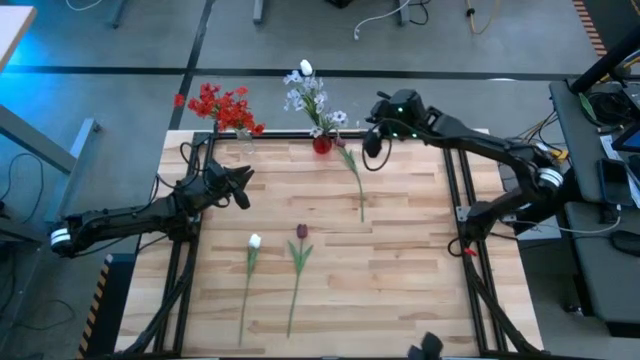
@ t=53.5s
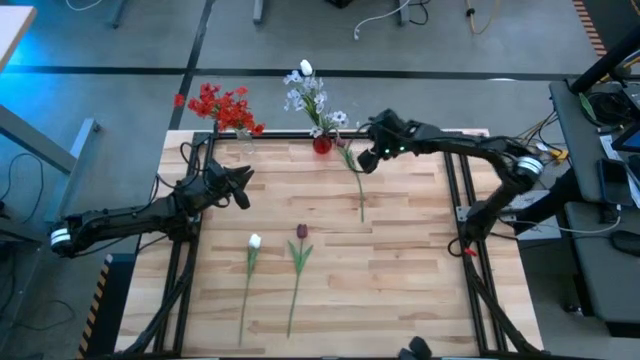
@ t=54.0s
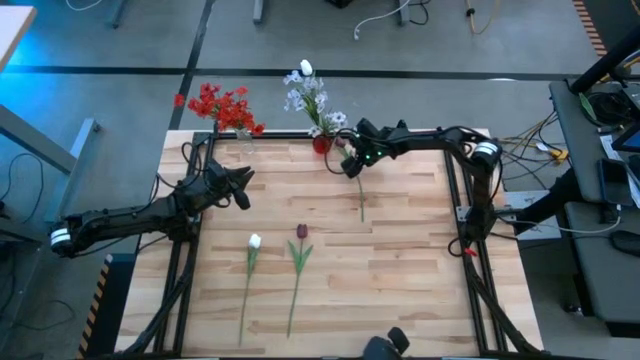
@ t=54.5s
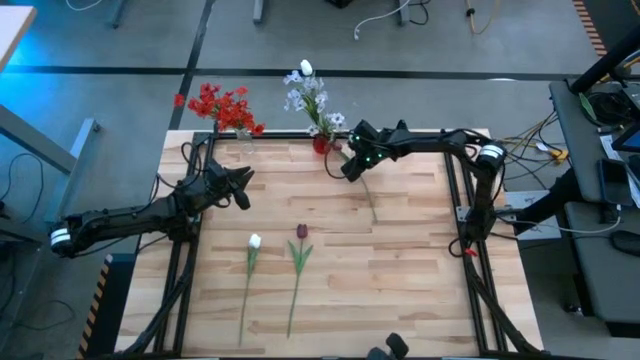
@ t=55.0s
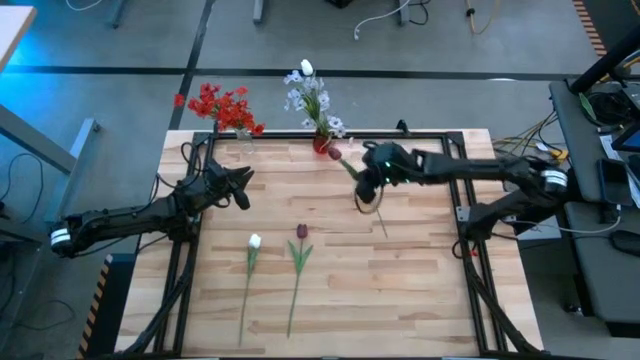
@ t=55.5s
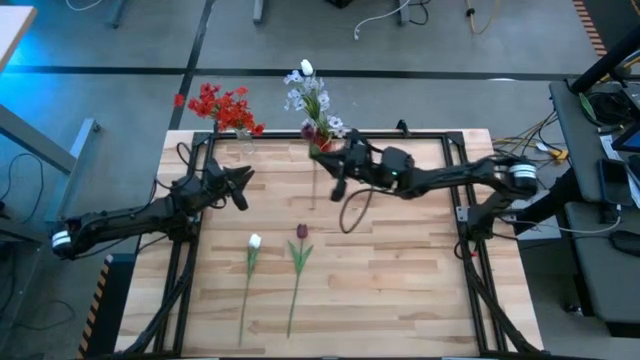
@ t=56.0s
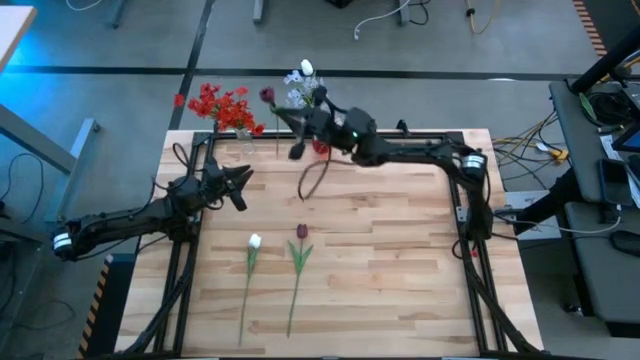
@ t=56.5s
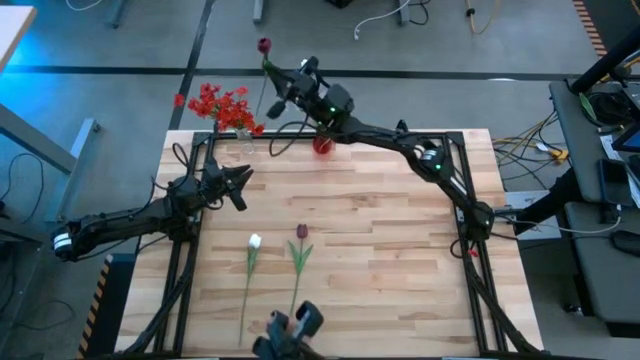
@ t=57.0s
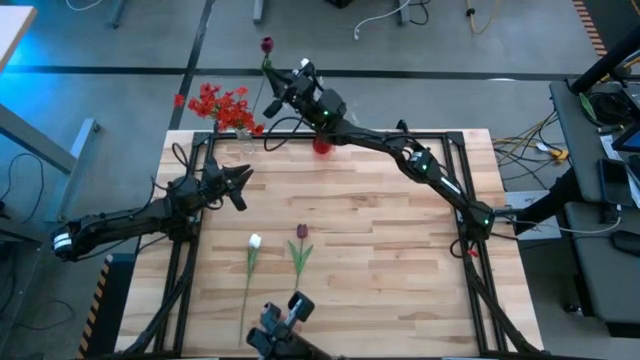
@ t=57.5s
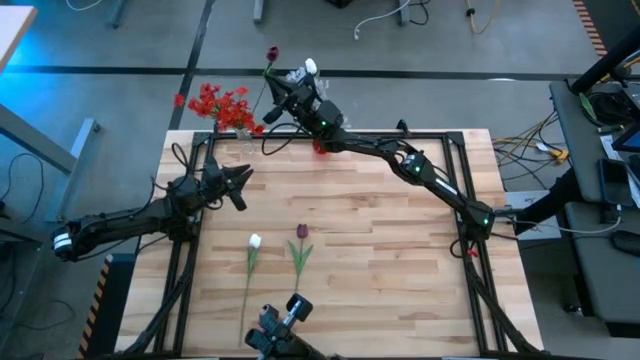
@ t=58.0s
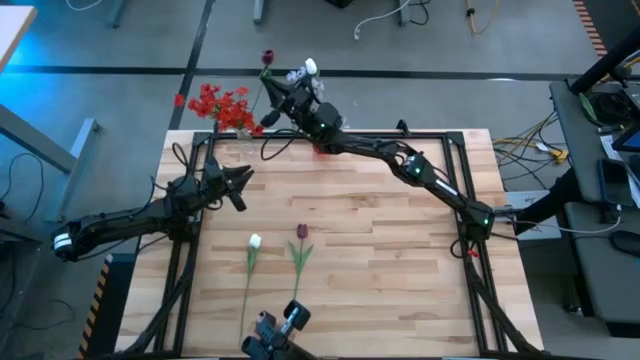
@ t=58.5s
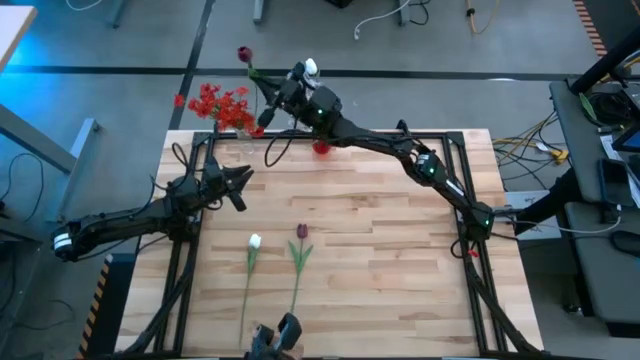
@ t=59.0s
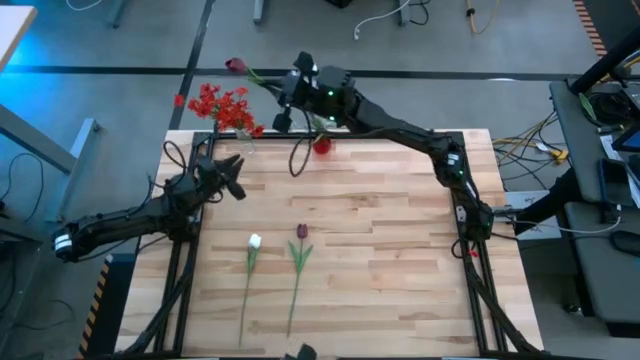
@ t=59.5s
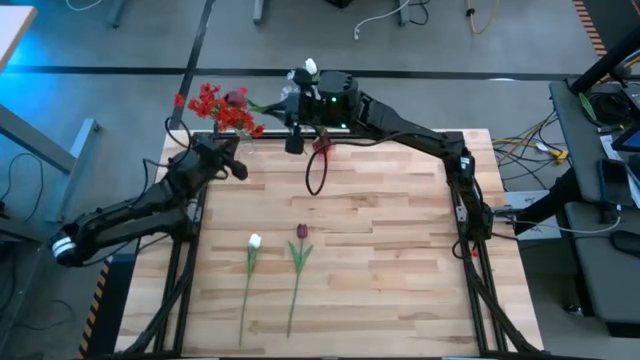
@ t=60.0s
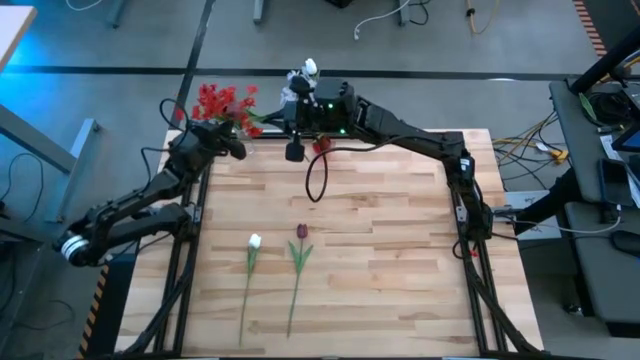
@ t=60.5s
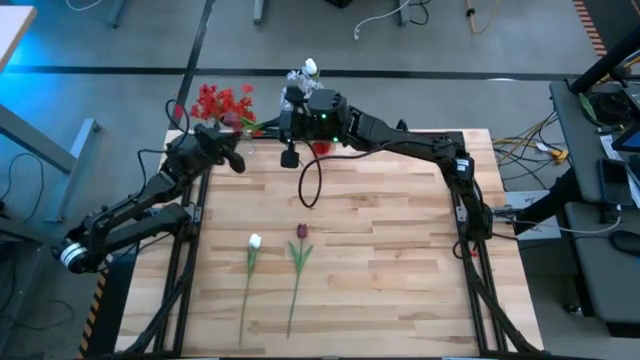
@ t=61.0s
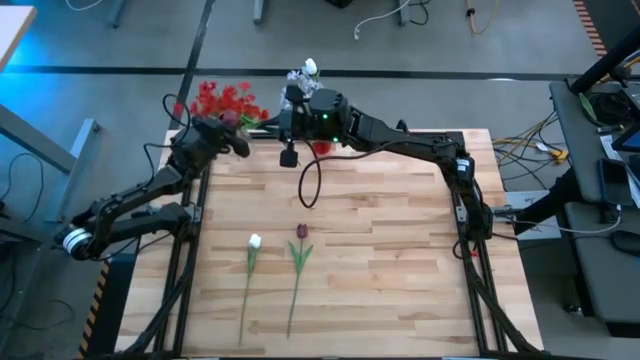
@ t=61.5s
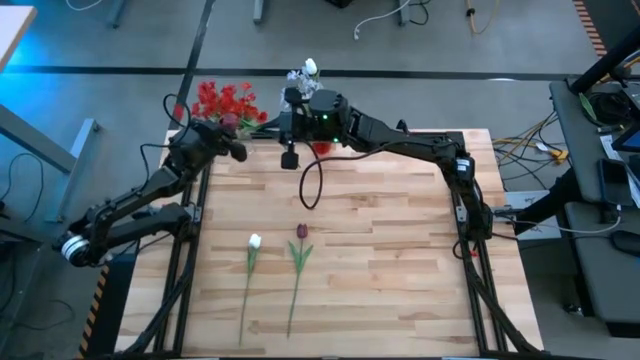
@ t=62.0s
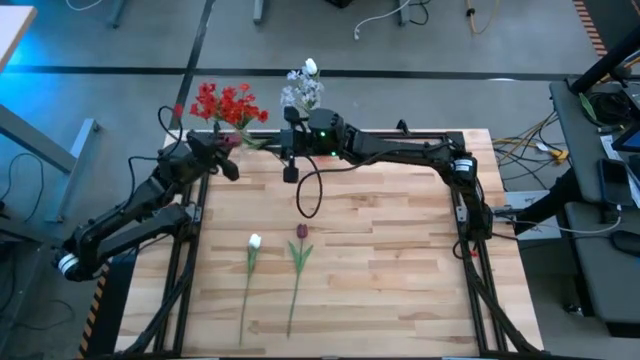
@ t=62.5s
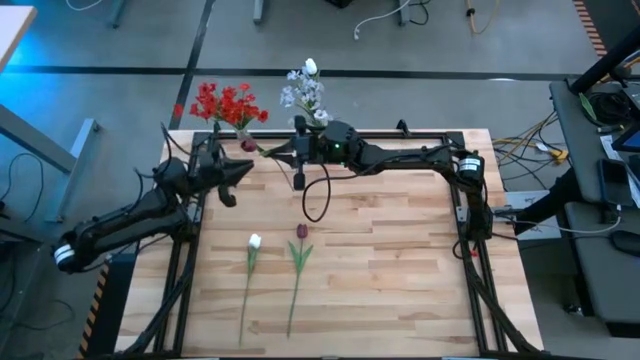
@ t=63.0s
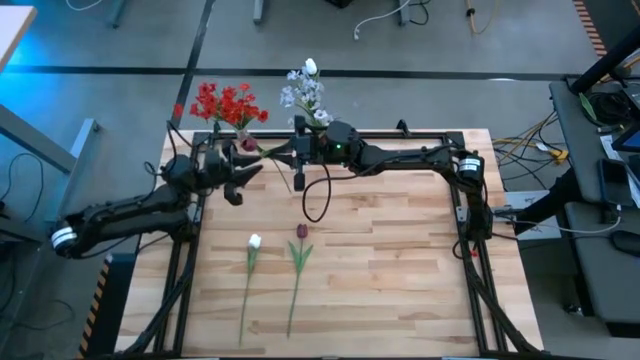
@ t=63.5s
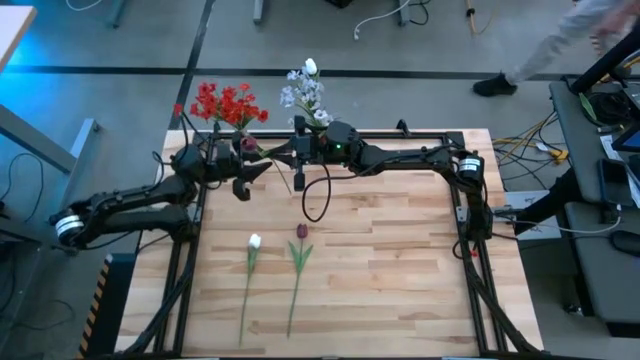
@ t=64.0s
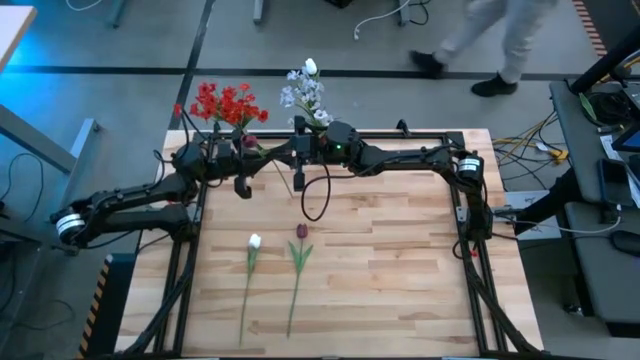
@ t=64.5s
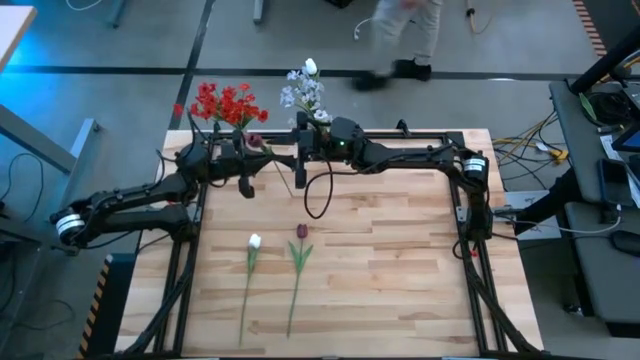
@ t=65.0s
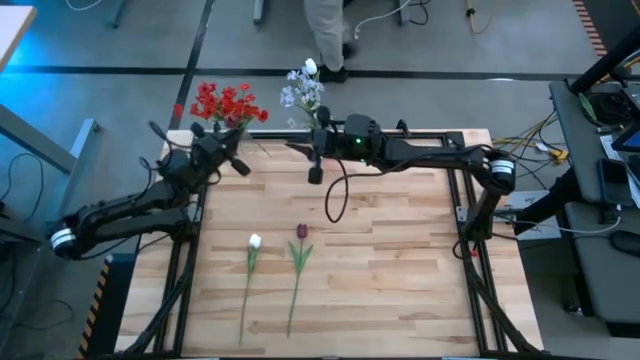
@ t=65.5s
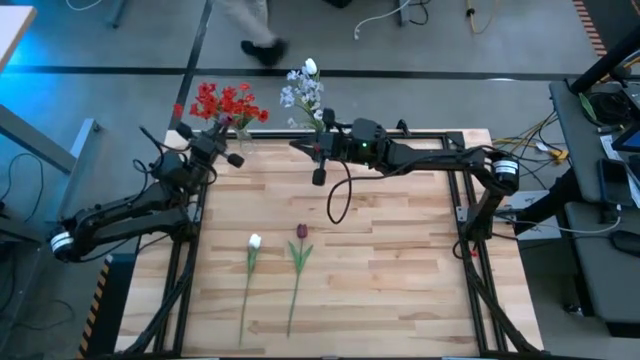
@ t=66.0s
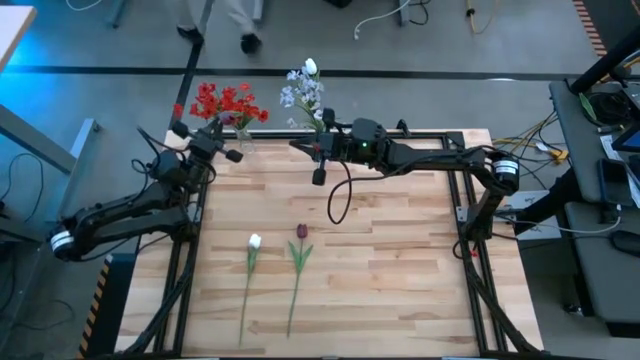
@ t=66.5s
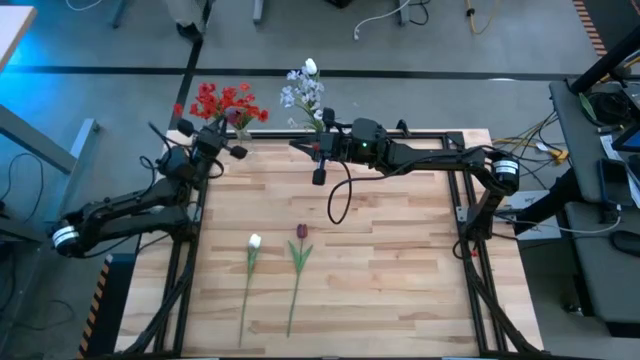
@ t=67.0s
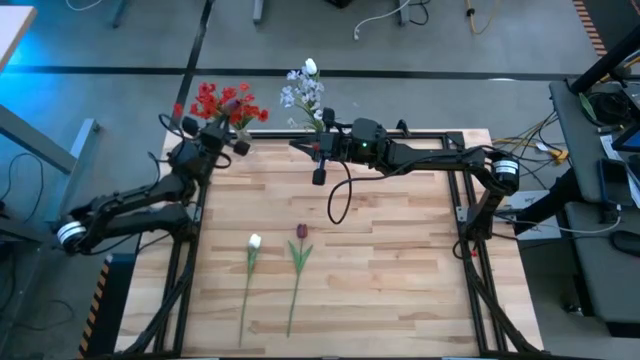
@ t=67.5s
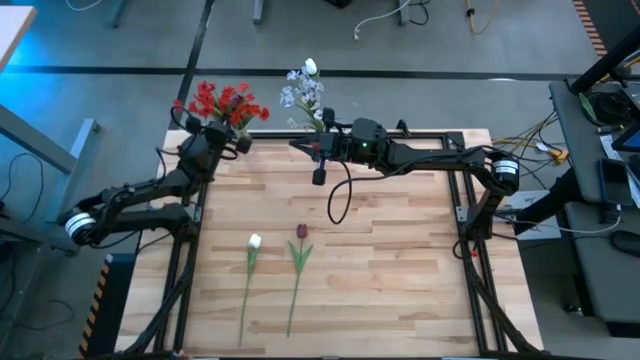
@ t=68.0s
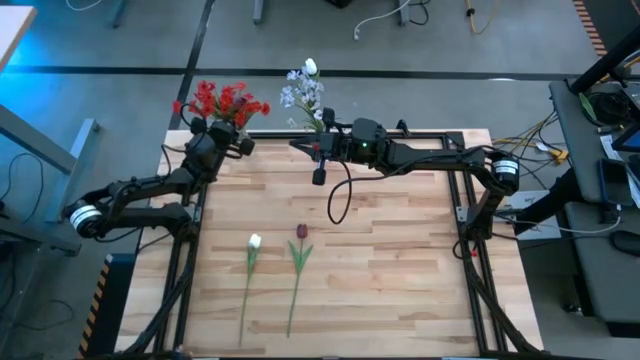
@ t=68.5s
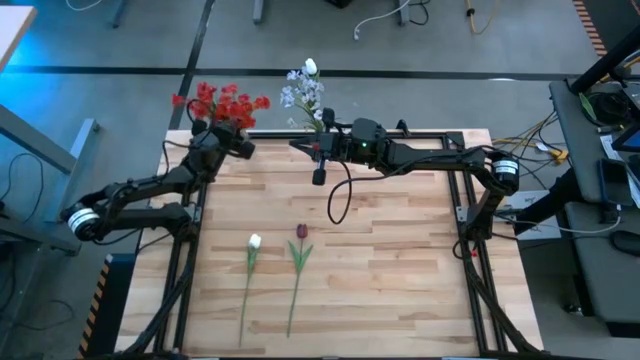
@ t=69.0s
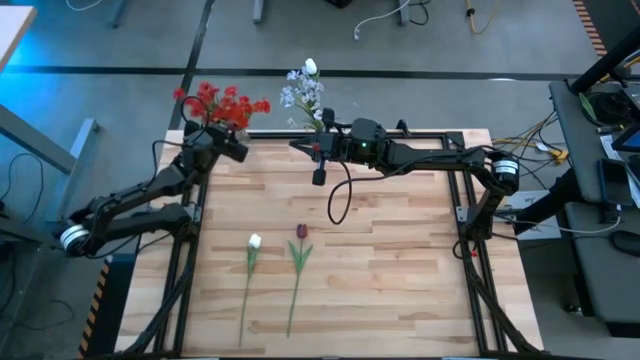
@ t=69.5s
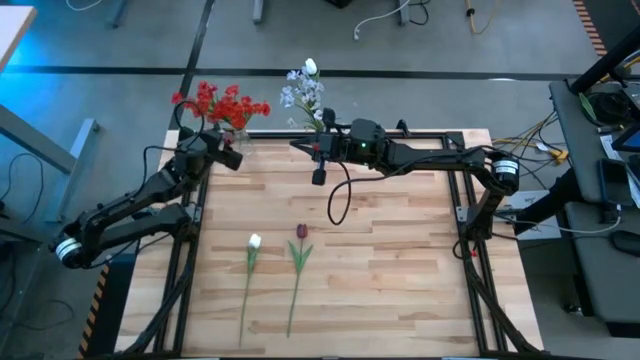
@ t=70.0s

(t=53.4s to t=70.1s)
Task: Sort flowers into vase by color
Put the top red flower into the transparent vase

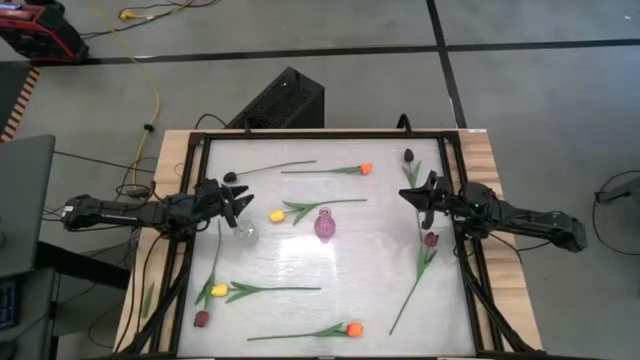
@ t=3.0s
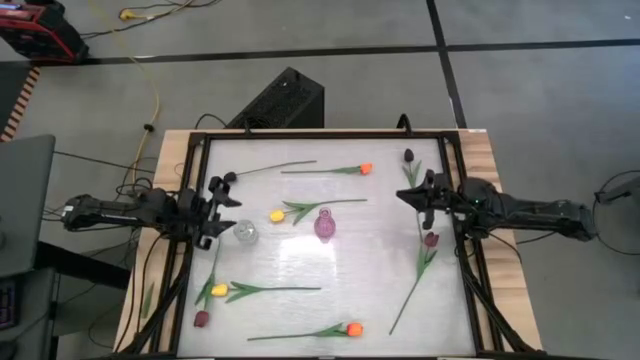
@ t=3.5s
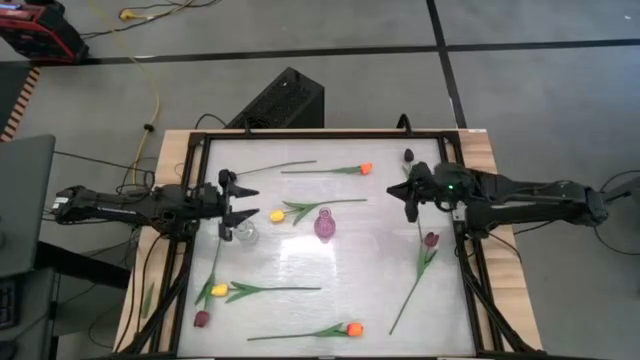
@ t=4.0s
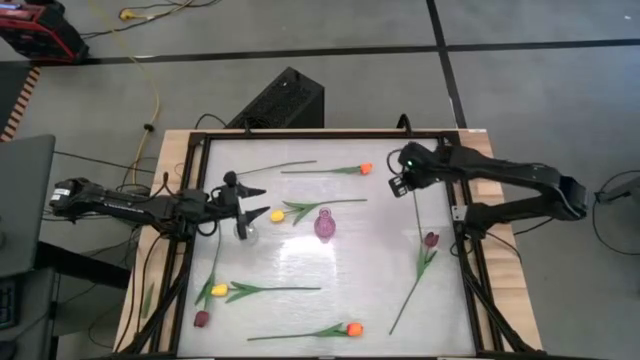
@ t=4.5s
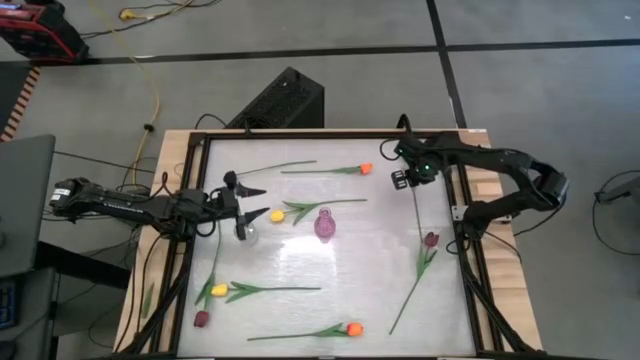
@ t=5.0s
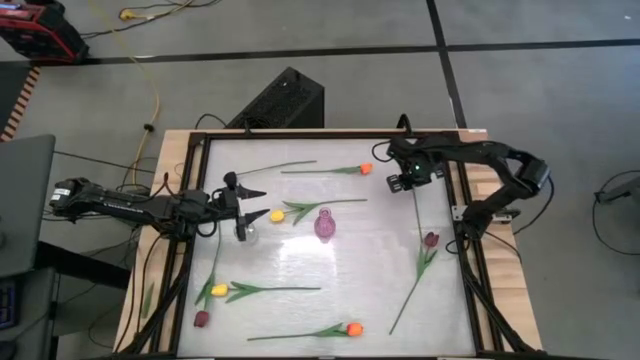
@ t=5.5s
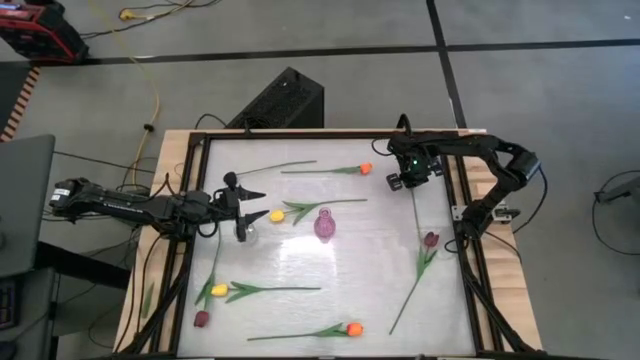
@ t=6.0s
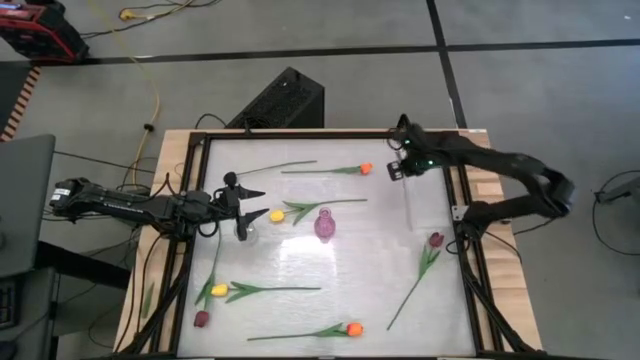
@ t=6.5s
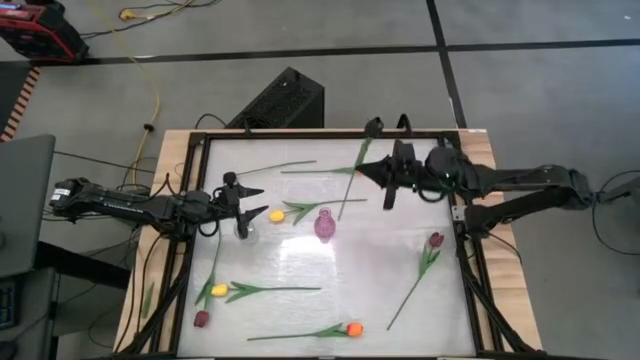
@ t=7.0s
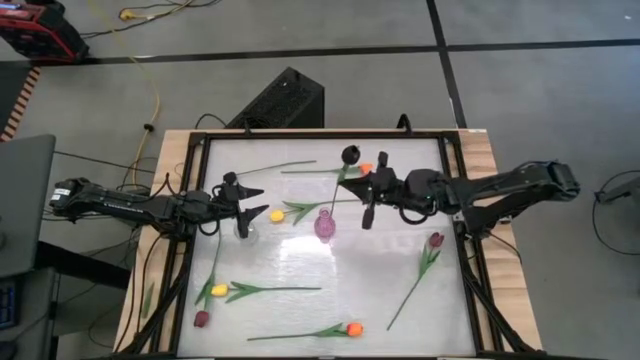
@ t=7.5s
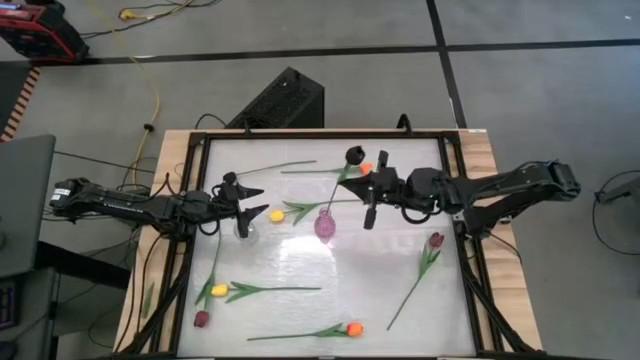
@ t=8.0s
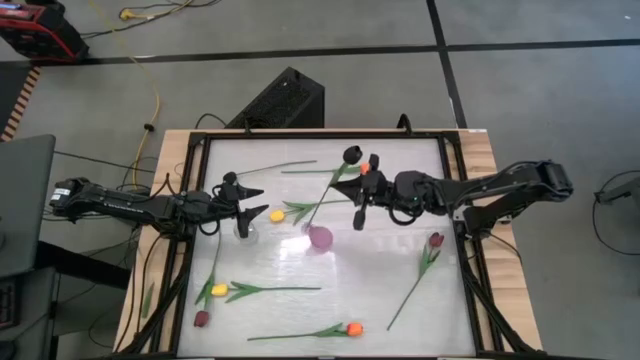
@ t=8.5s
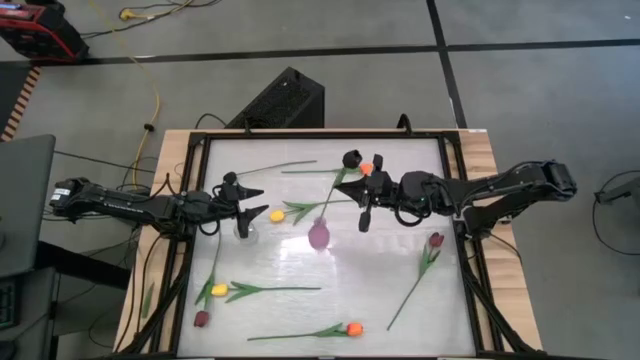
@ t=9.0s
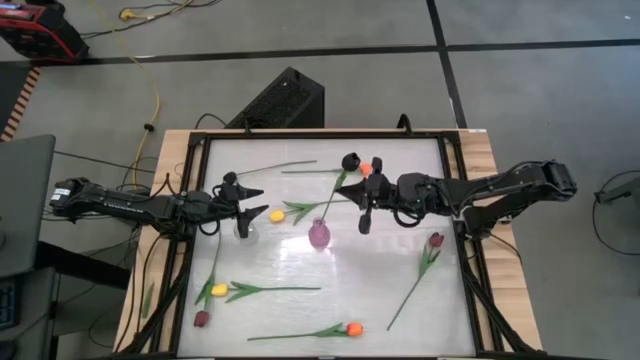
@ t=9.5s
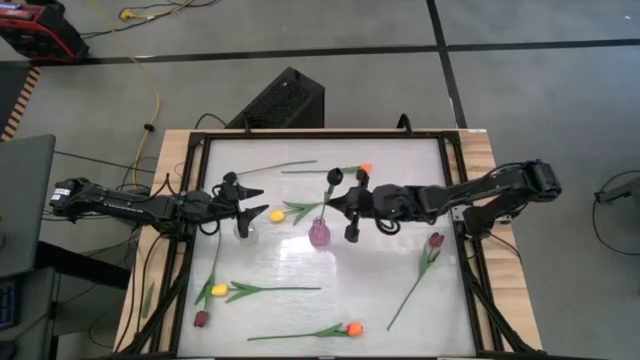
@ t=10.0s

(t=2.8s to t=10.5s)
Task: Sort flowers into vase by color
Put the right black flower into the violet vase
